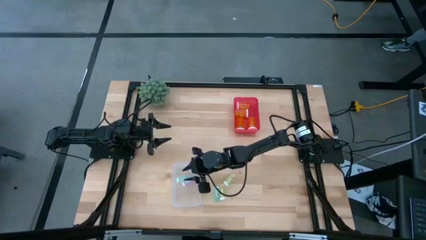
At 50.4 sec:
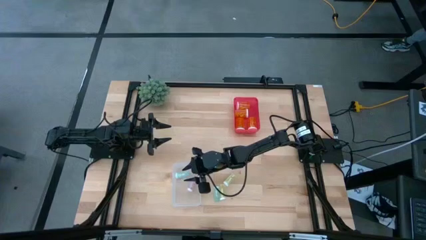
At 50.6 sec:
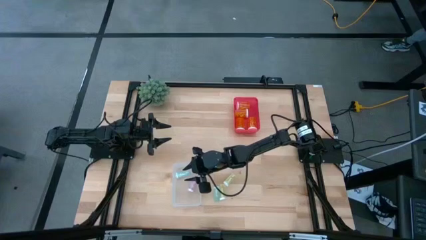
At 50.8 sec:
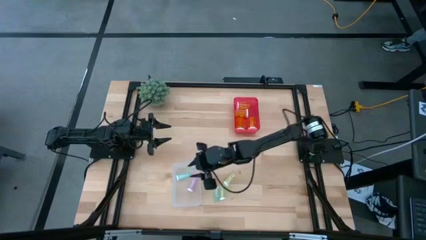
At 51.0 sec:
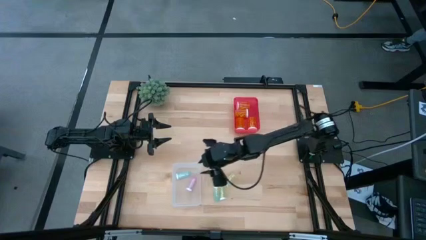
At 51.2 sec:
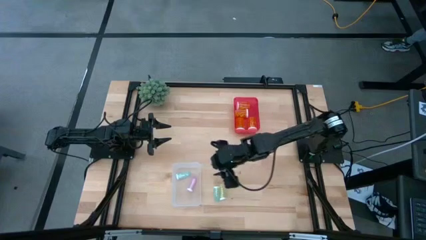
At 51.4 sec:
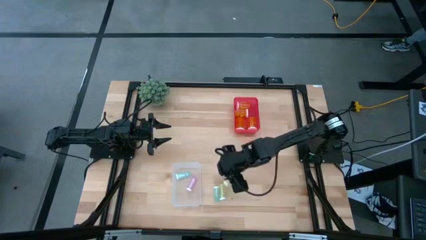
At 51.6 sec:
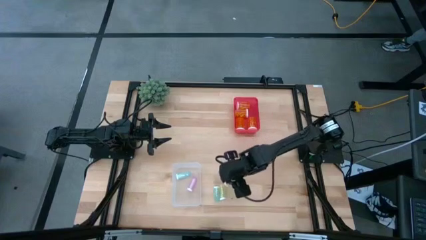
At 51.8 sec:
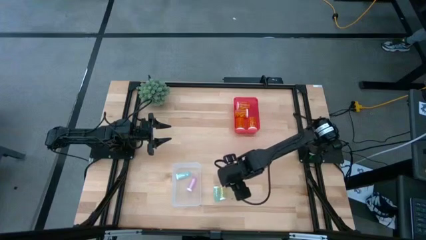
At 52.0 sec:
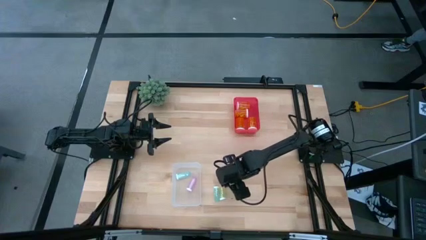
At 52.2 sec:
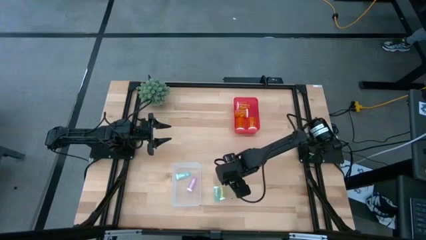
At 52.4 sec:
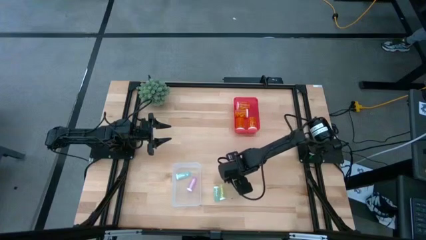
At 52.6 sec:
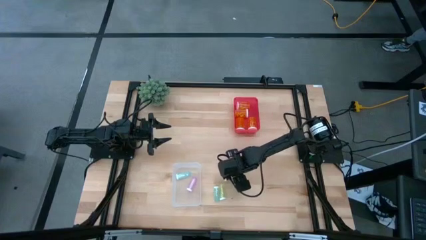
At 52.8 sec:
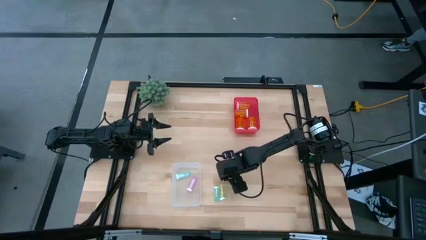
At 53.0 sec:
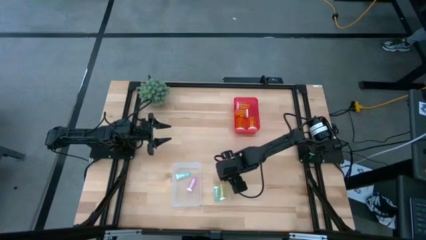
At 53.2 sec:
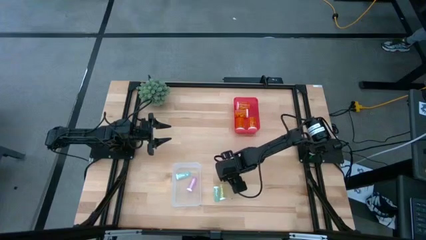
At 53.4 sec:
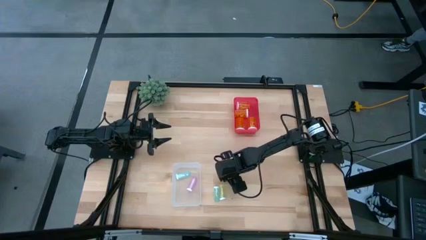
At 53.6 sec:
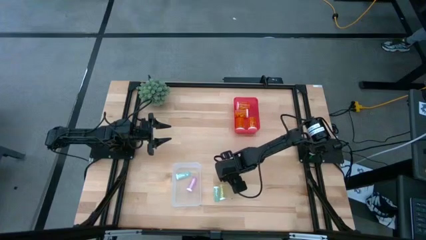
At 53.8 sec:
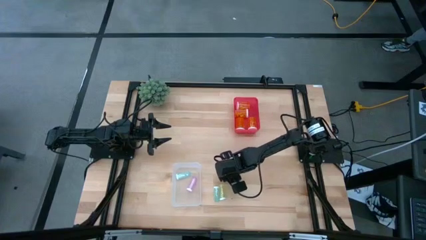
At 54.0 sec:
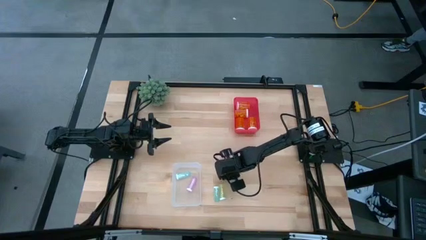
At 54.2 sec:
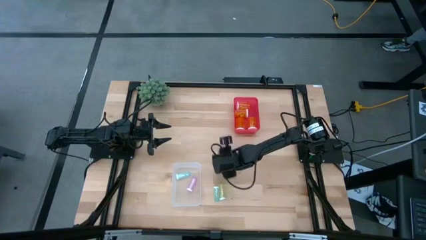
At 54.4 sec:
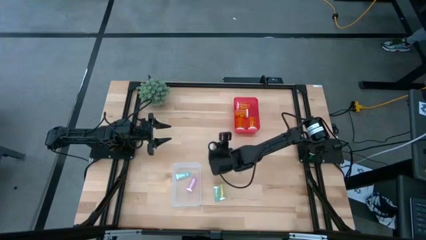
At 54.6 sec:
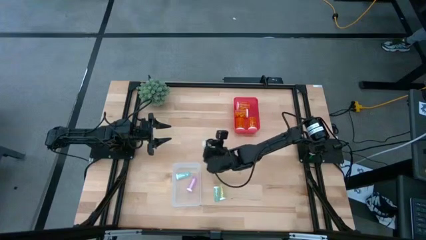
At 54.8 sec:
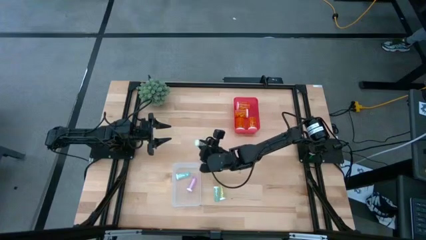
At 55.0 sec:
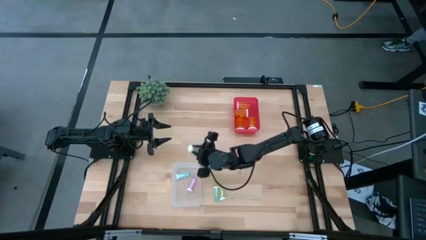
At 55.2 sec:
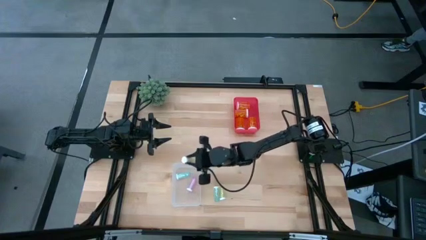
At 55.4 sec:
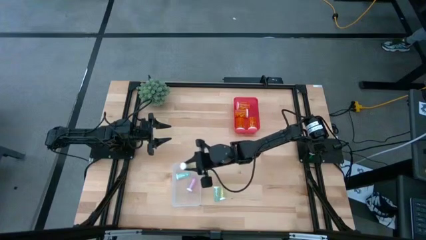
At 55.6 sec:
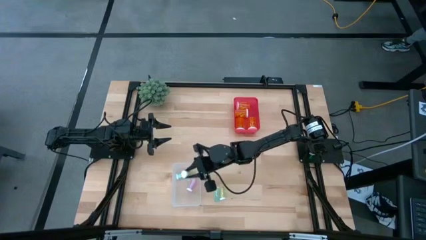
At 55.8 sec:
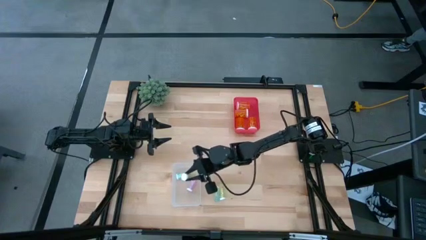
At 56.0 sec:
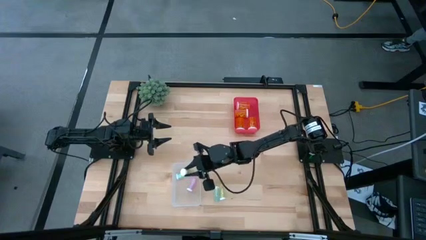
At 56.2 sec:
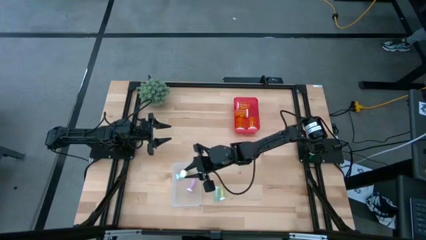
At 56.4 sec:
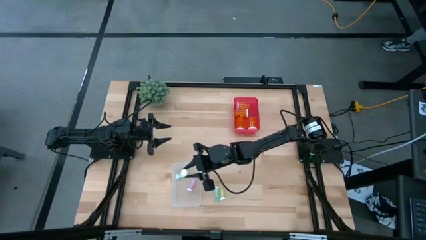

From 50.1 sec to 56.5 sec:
Task: Pick and place medicine bottles into bin by pill shape (circle, oval)
Put the small yellow pill bottle into the transparent bin

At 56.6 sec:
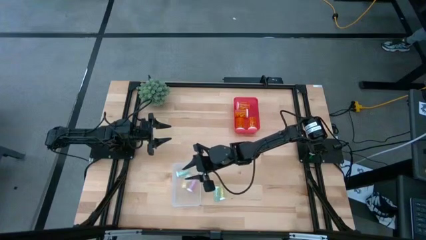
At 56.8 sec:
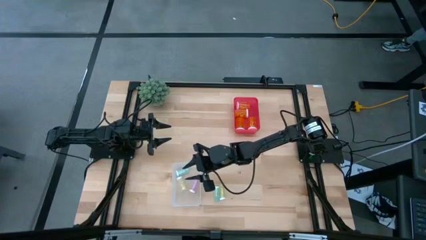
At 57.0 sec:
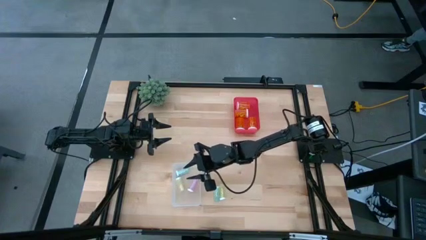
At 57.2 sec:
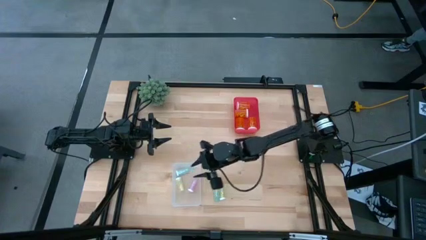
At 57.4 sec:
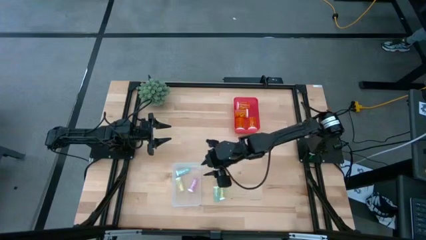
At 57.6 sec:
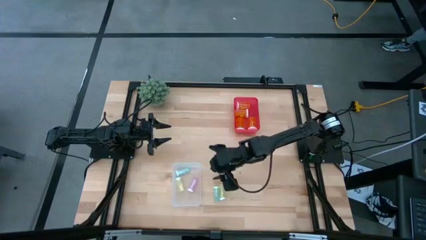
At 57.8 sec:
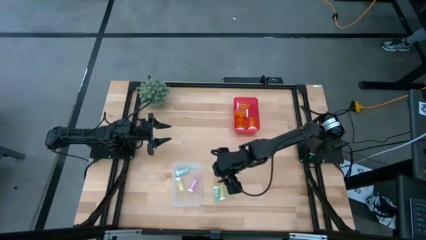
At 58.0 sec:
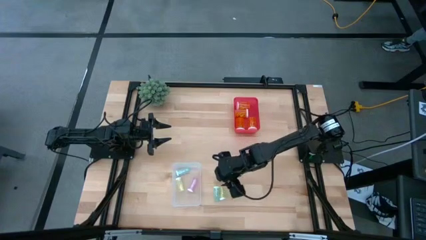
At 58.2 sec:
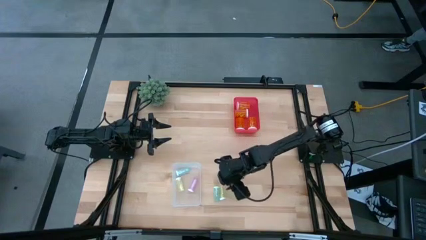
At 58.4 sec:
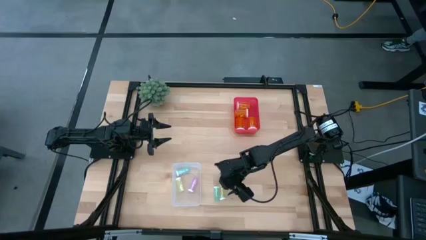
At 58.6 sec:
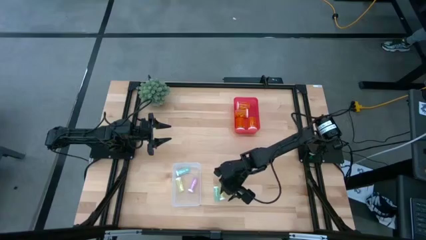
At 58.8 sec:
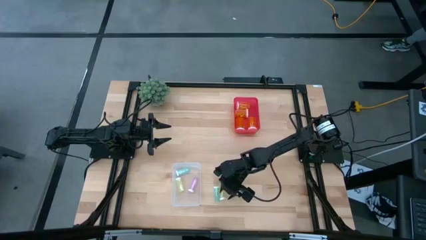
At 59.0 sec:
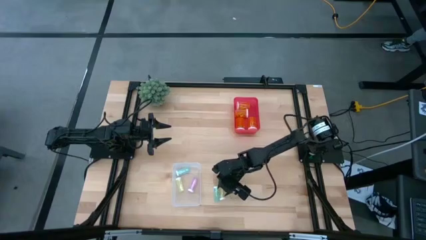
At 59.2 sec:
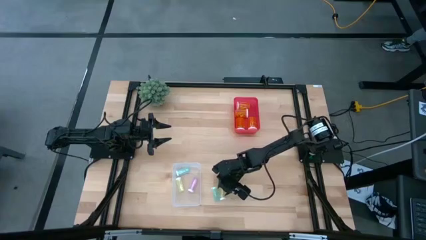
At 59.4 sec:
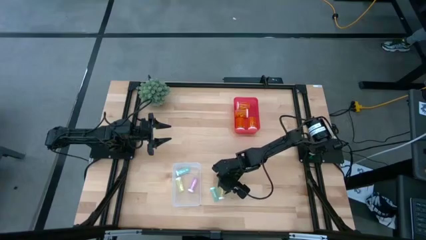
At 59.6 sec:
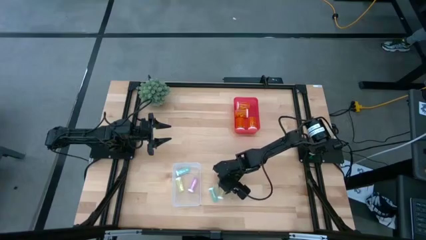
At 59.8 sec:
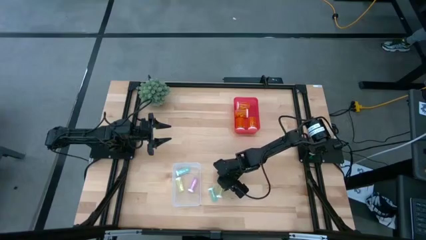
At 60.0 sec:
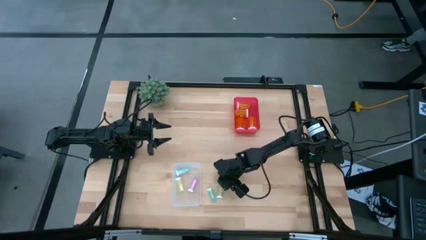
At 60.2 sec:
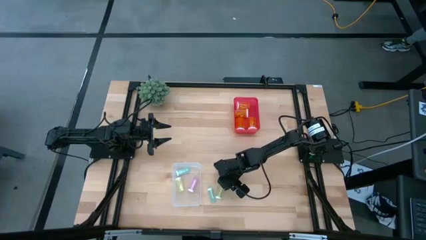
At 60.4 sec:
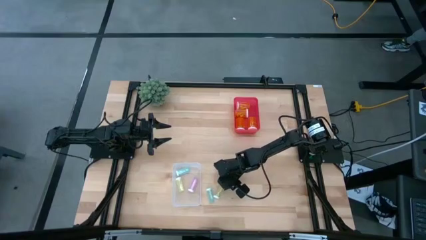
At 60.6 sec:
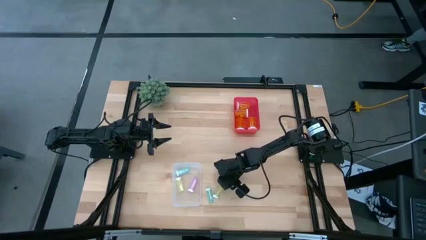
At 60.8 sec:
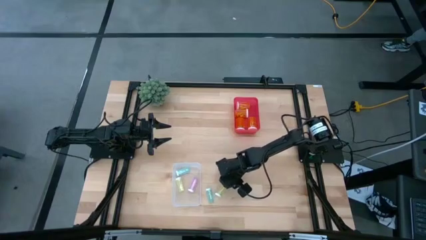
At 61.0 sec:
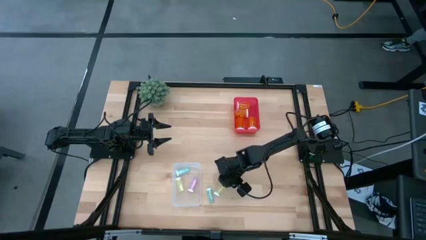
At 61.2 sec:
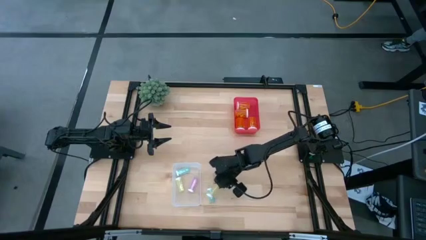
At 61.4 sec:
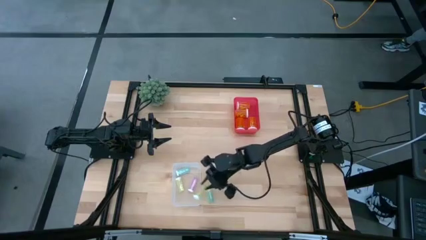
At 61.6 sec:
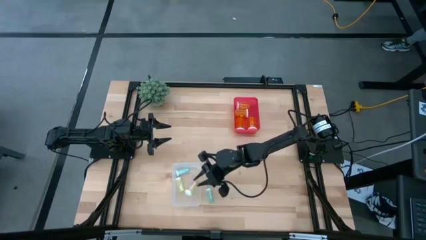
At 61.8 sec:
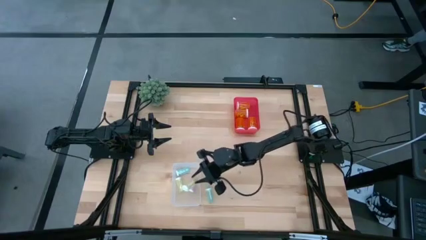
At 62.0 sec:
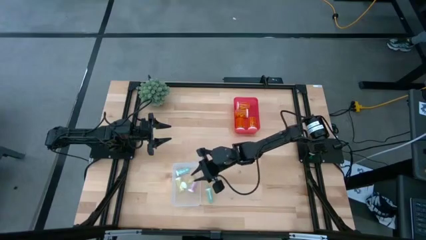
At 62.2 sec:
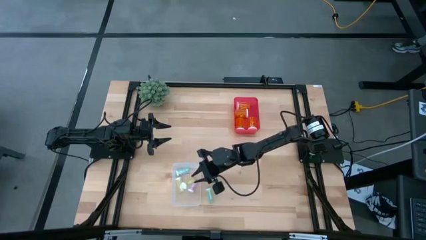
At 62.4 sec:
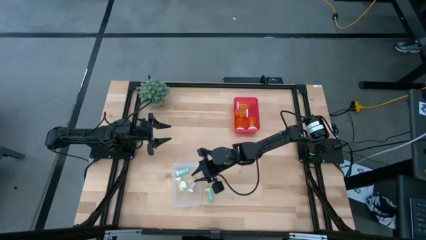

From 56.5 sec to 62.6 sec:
Put the small yellow pill bottle into the transparent bin

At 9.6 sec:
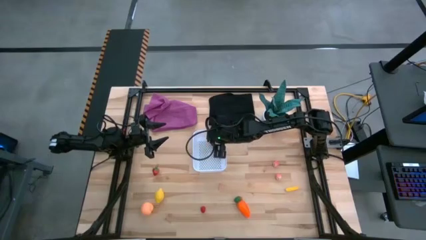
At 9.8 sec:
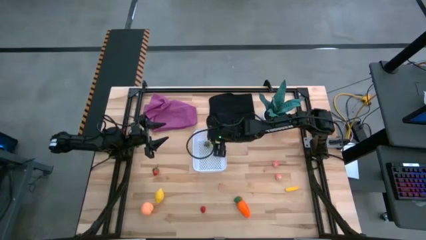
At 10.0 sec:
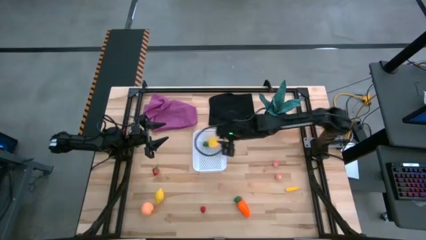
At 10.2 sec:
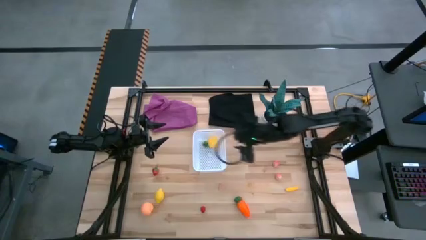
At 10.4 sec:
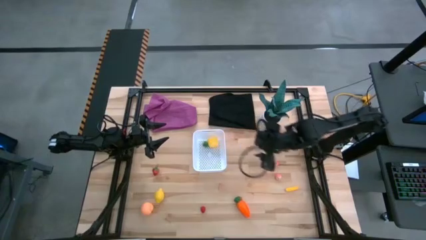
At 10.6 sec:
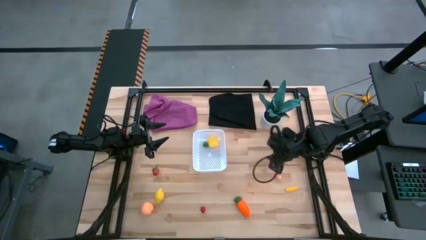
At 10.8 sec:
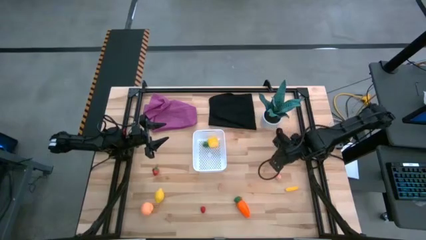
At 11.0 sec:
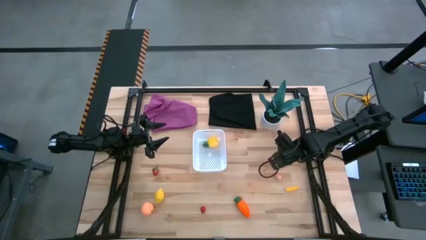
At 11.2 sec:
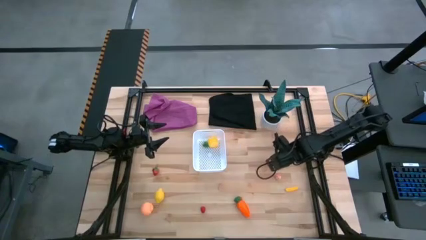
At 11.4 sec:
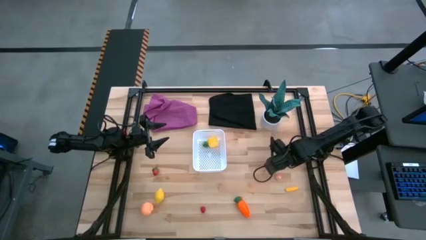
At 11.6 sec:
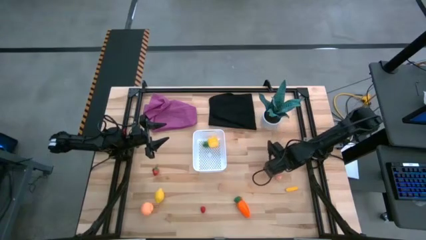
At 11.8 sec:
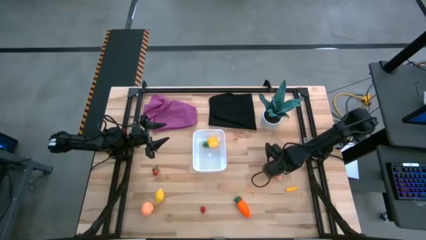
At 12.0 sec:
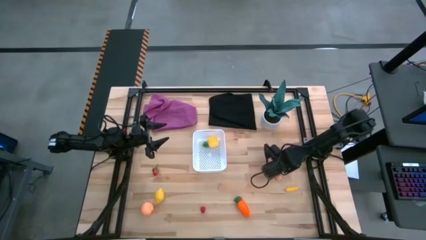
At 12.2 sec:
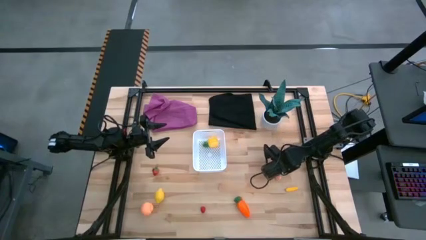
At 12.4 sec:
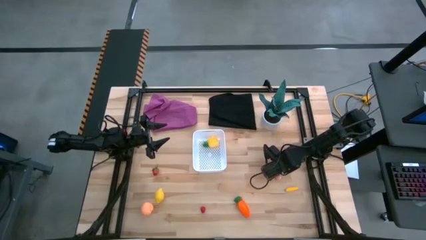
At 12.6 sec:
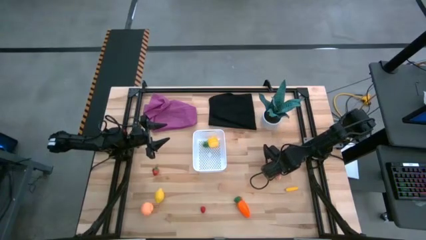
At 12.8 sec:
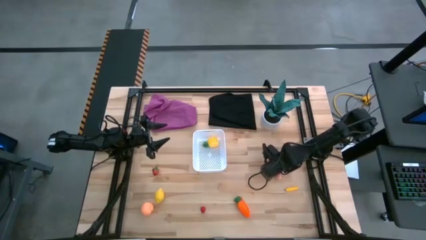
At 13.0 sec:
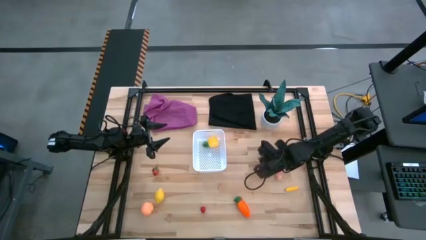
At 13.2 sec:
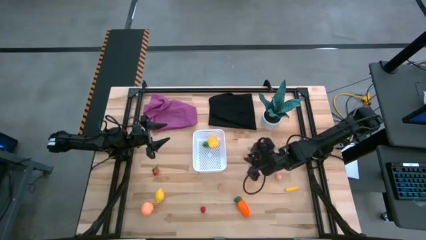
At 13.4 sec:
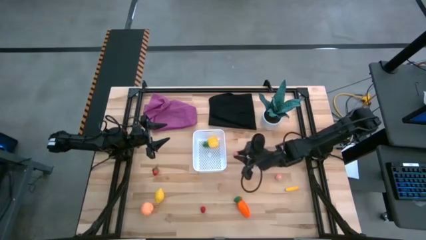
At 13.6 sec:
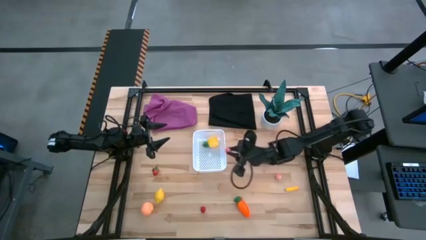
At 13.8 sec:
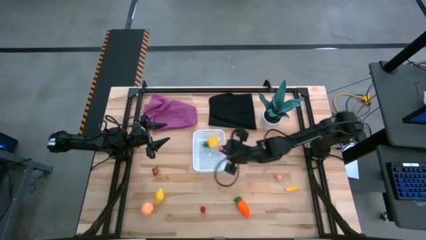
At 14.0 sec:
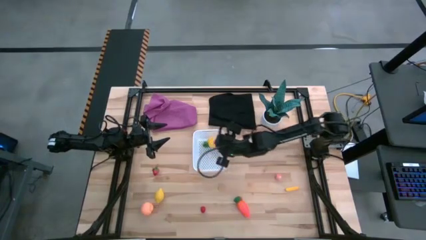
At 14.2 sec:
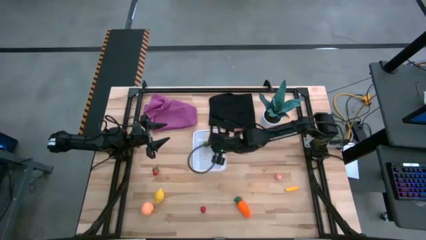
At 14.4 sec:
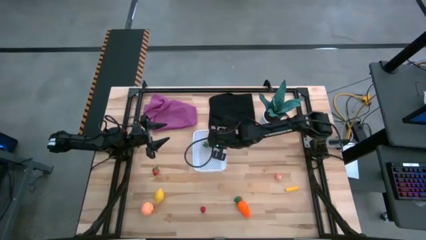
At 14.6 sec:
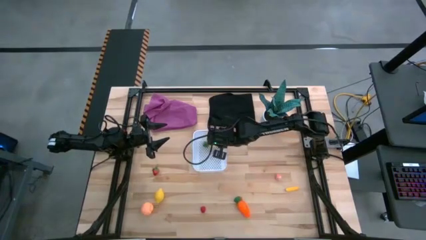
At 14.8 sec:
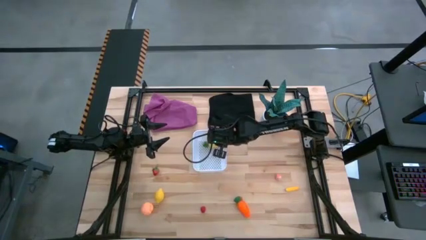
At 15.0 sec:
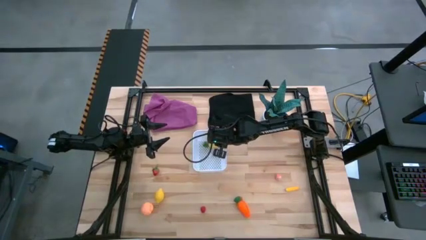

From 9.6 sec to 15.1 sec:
Task: Pick and placing Produce into tupperware
Put the top pink peach into the white bin
